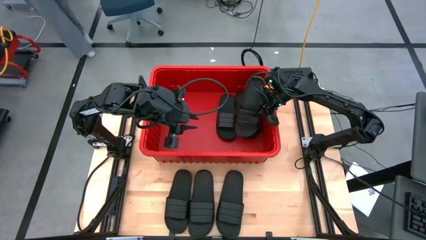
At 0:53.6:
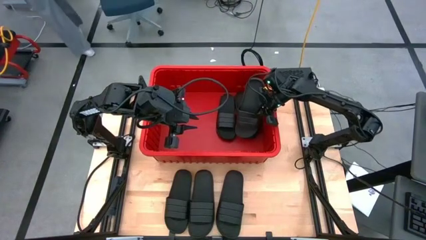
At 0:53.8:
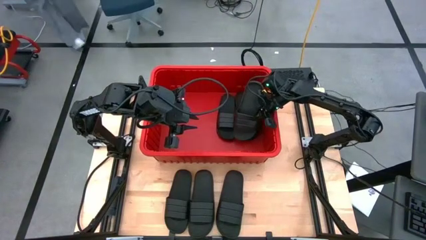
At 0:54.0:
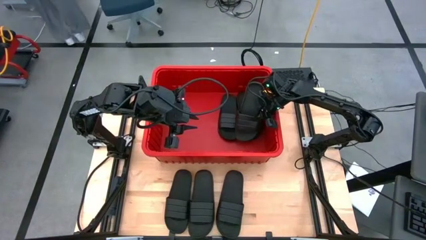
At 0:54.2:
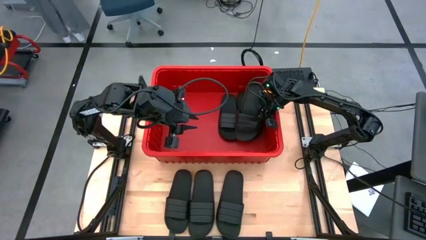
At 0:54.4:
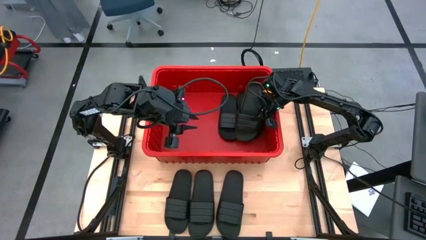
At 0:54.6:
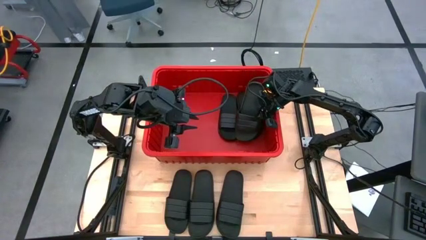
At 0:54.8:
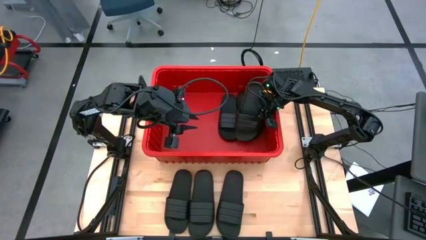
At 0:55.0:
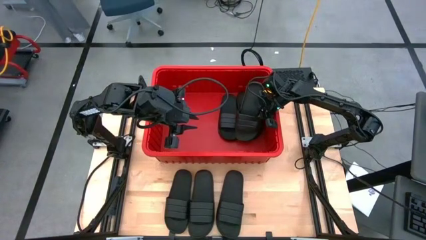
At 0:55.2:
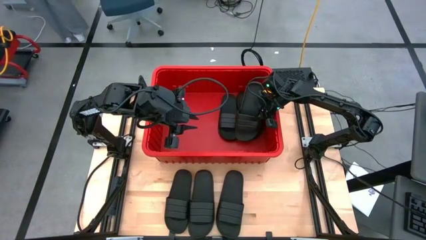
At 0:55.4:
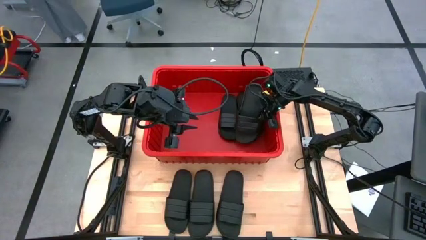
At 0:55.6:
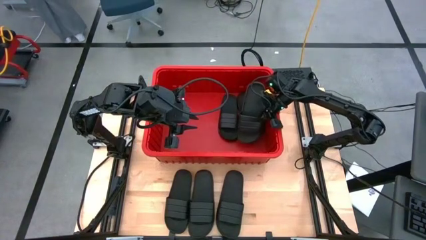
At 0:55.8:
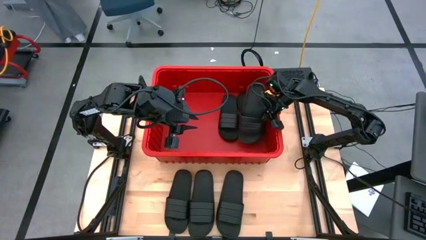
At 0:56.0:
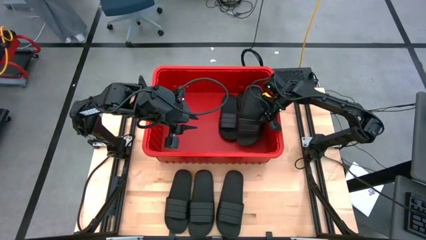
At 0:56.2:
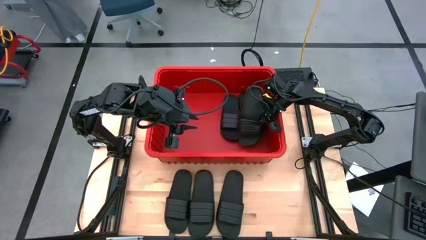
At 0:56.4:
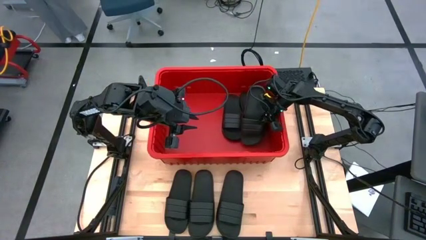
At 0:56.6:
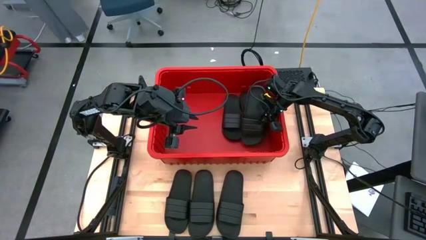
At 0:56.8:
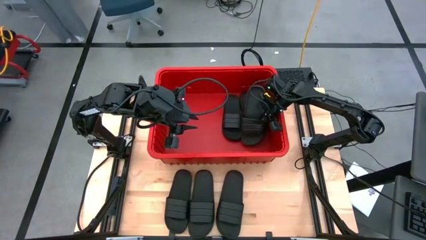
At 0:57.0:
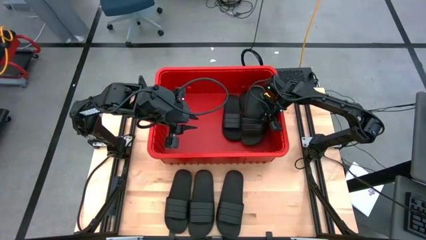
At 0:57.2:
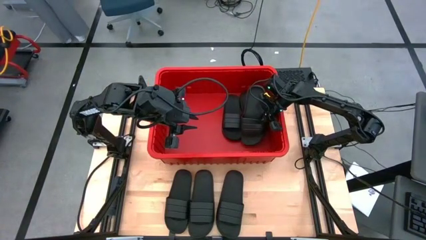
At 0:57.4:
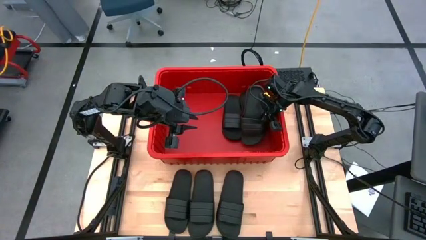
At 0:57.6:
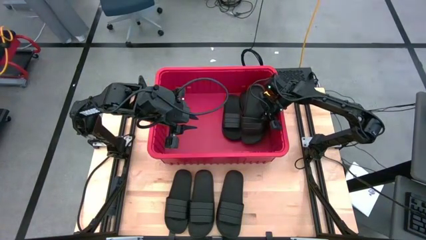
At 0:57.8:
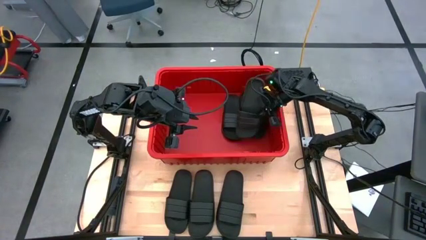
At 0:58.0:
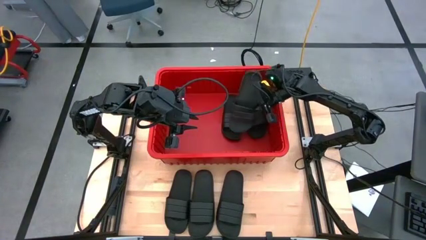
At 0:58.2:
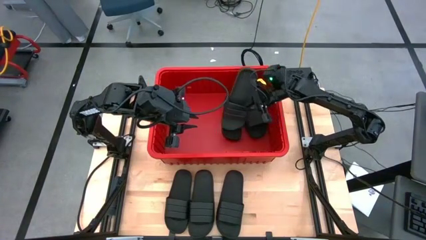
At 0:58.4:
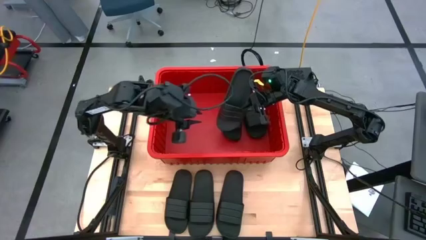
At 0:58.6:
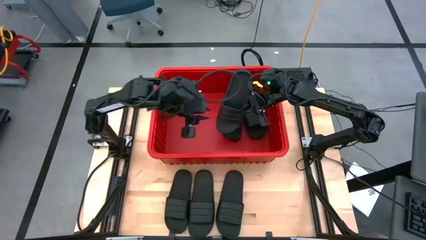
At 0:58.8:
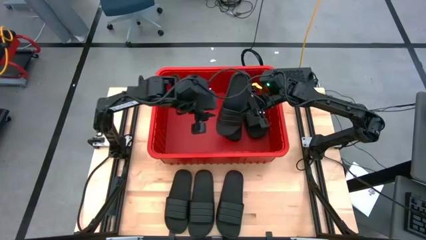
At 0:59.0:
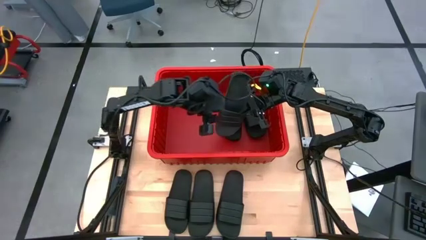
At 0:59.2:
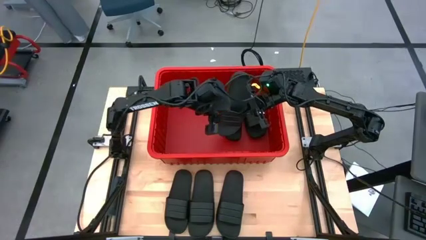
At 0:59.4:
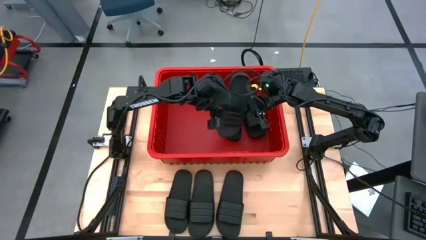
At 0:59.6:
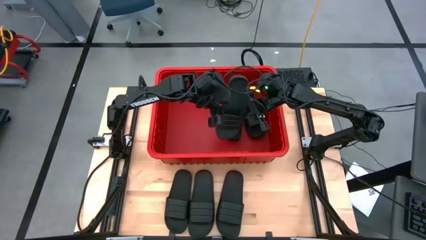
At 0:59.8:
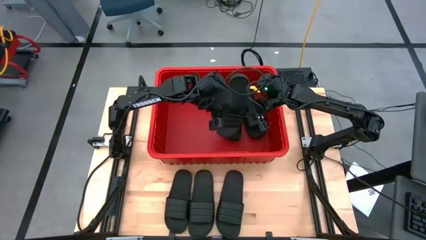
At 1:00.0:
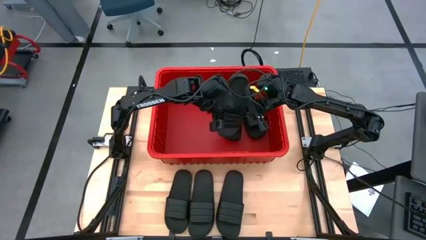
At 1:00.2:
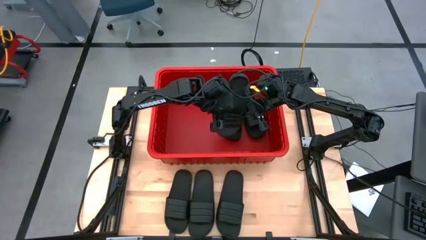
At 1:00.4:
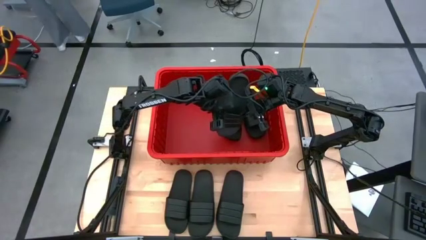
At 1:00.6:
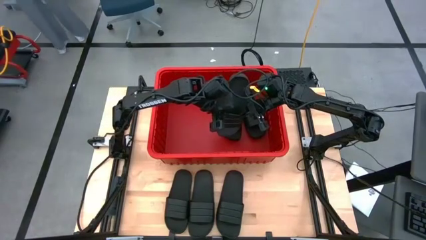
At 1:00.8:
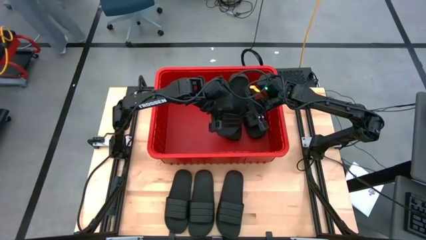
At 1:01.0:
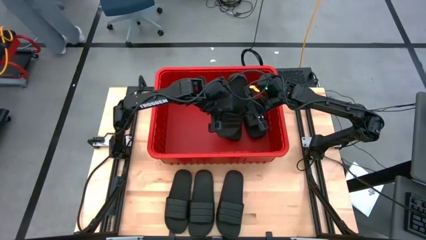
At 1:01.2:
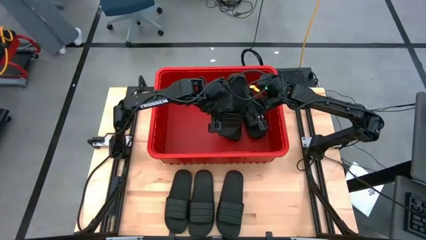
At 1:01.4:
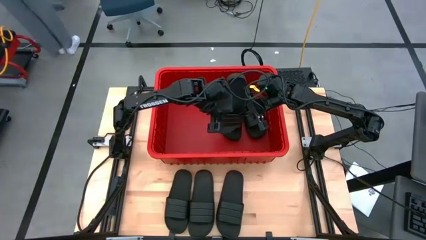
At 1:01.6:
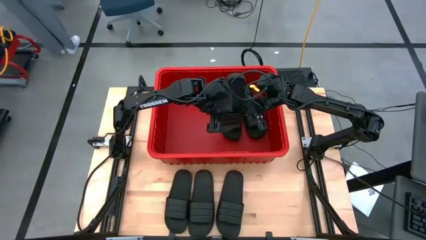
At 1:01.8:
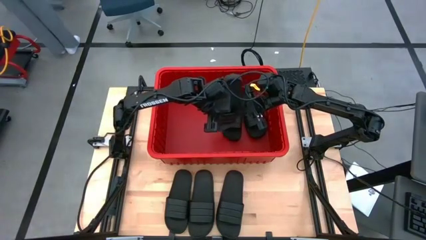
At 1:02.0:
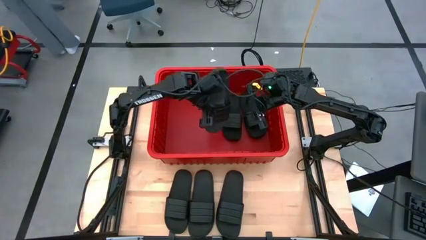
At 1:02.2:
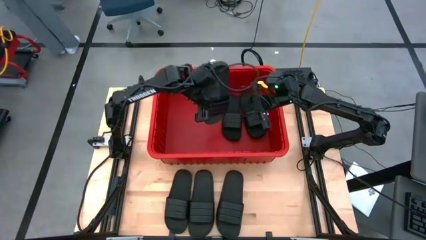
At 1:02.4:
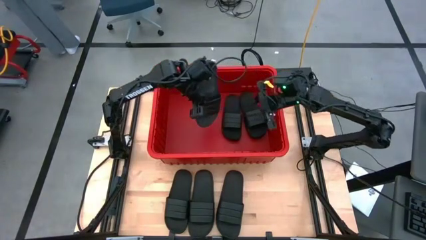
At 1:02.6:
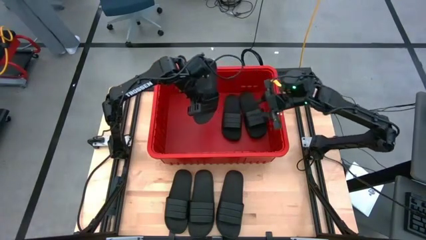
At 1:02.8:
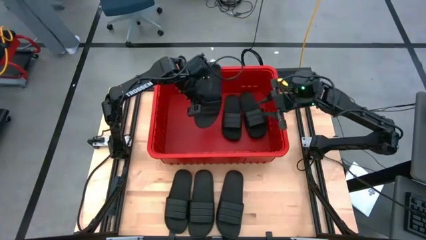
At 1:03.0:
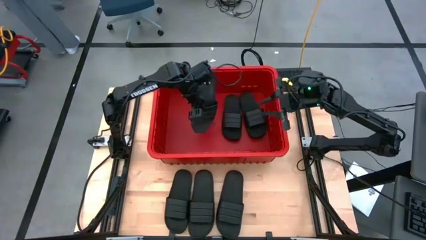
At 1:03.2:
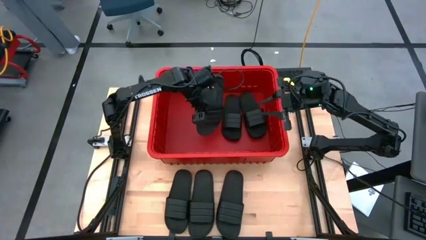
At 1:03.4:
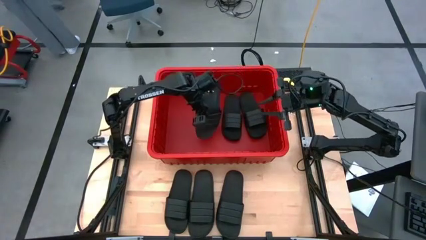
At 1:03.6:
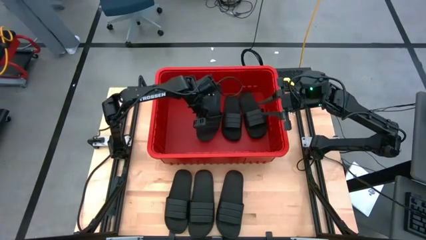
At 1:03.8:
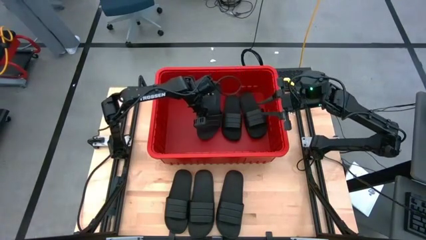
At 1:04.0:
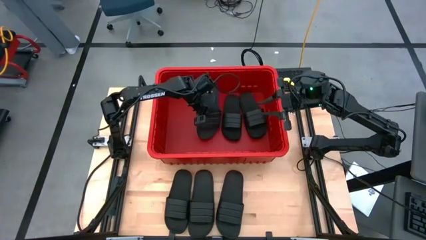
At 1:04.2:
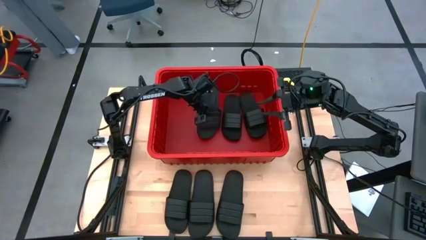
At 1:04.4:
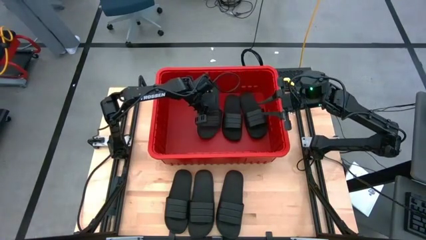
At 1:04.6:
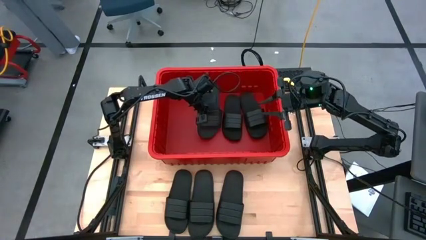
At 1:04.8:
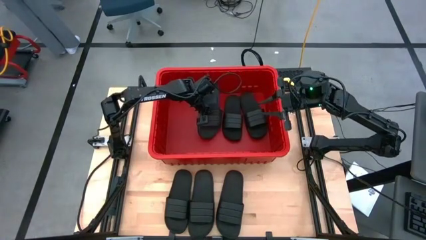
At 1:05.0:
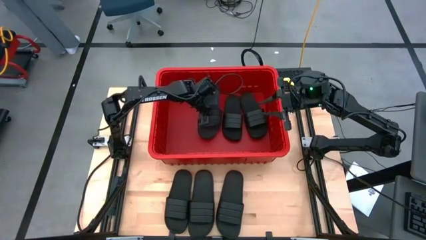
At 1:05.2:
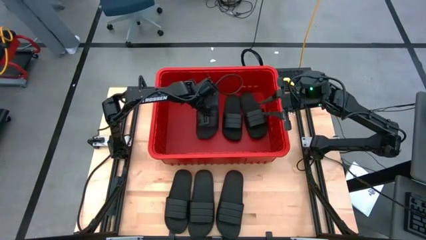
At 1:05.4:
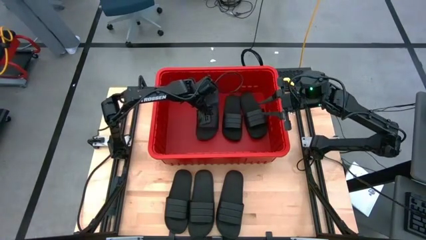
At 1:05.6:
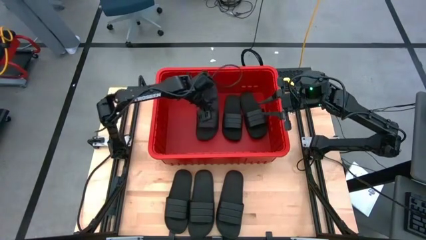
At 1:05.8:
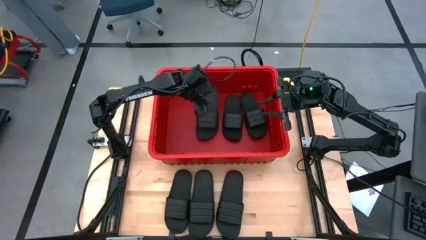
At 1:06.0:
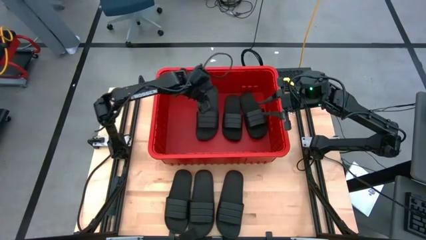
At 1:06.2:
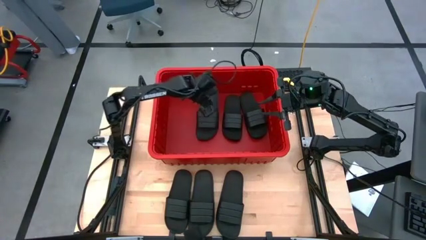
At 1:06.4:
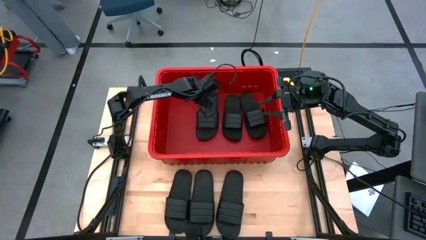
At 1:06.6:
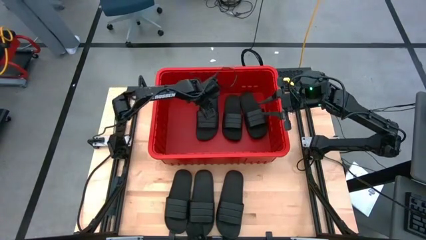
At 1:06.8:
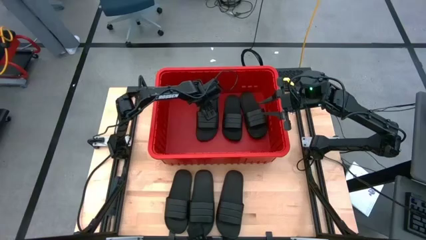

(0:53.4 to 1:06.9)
Task: Pick and place slides into bin
Put the black slide into the red bin
